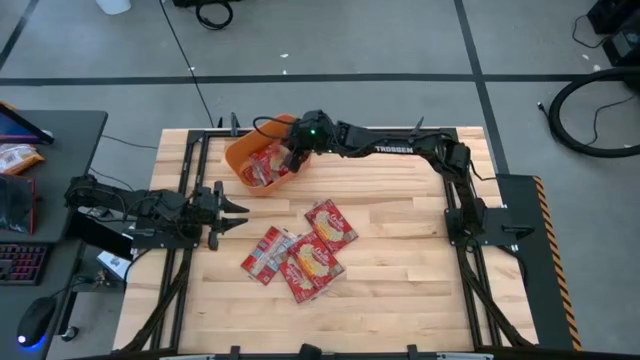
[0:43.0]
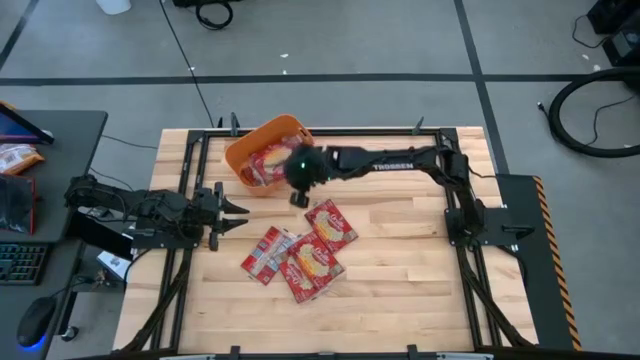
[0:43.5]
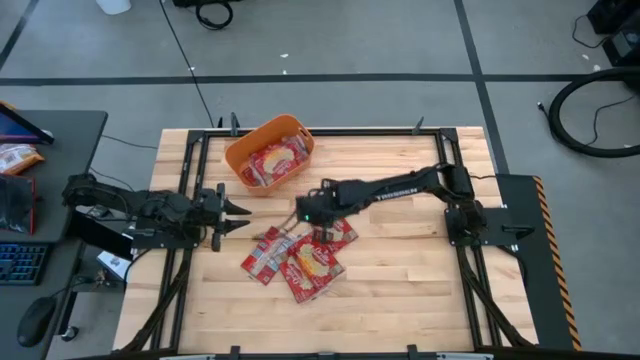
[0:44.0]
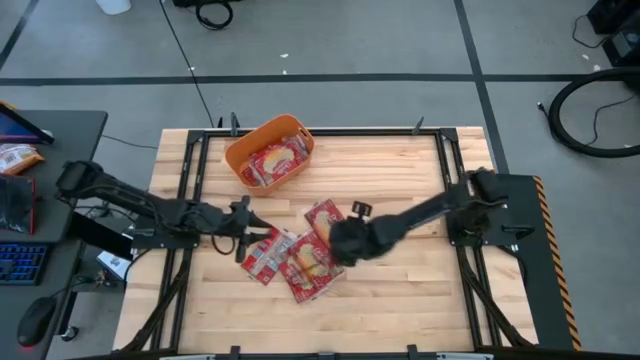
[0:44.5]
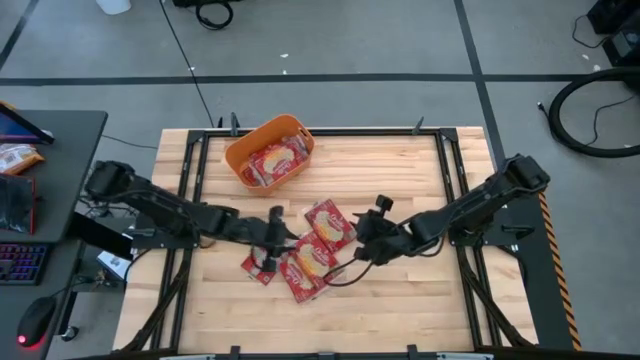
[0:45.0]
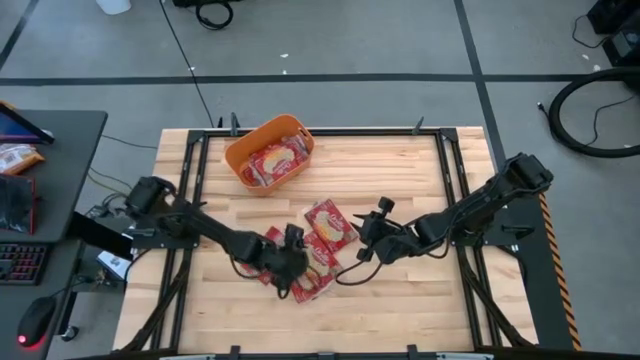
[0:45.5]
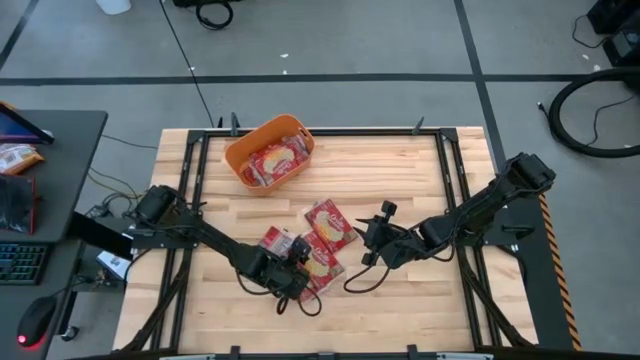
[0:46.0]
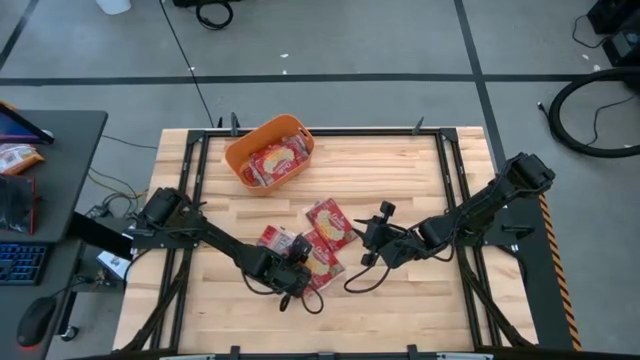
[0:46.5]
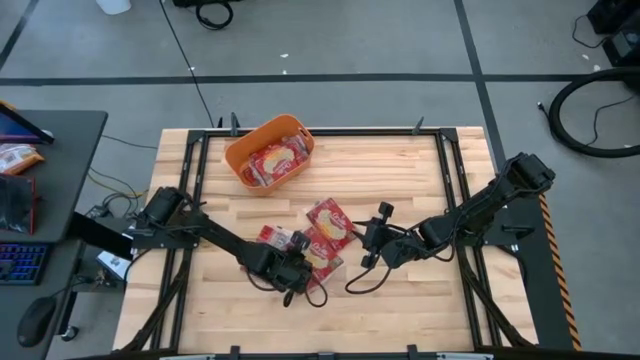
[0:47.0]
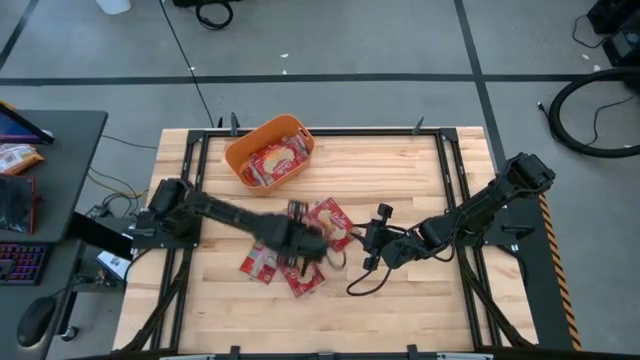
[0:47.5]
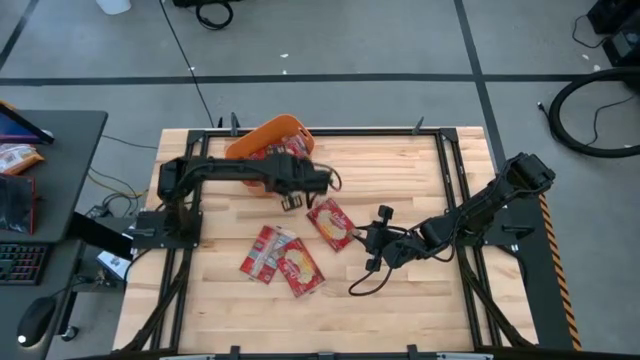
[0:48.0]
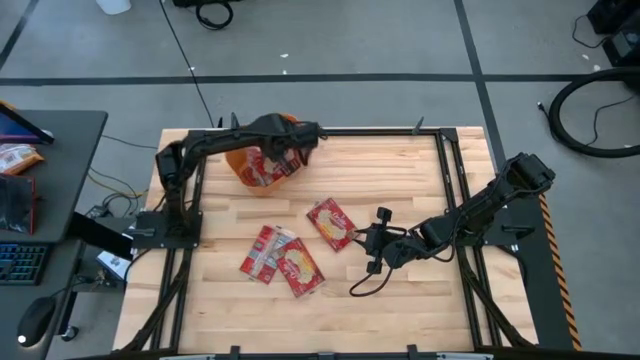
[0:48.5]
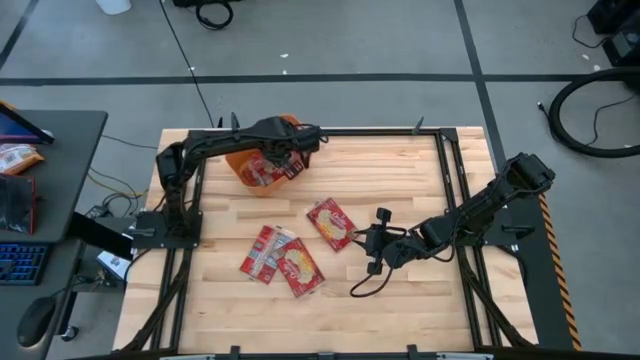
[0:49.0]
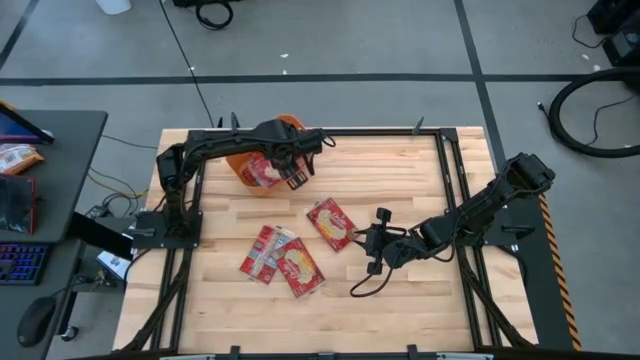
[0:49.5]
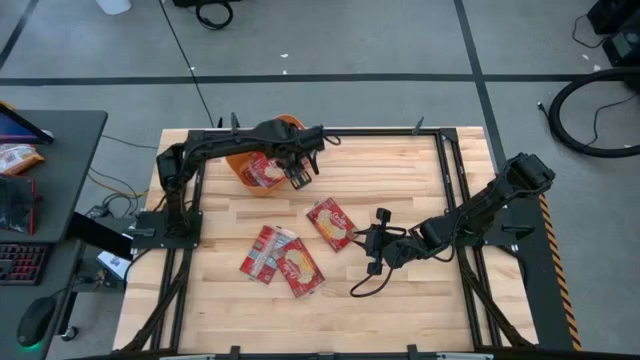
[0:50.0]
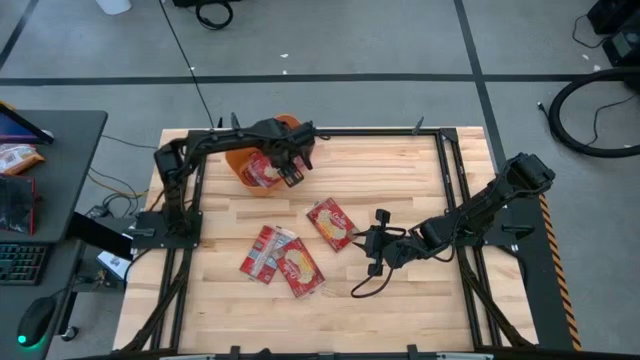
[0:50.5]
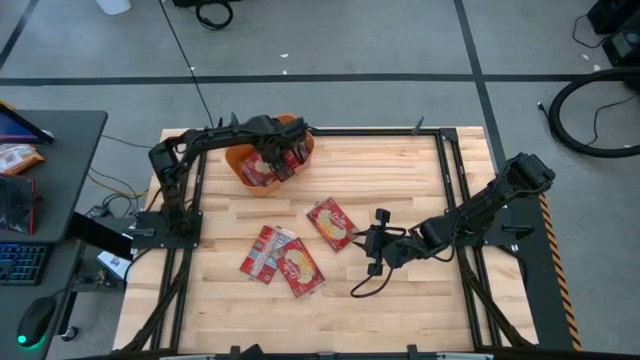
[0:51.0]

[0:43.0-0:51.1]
Task: Sort popcorn bags into baskets
Put the red popcorn bag into the orange bin

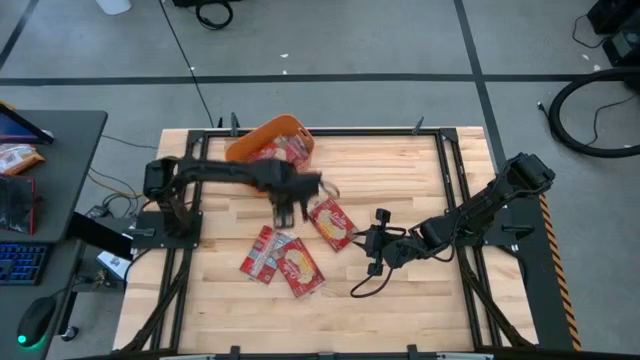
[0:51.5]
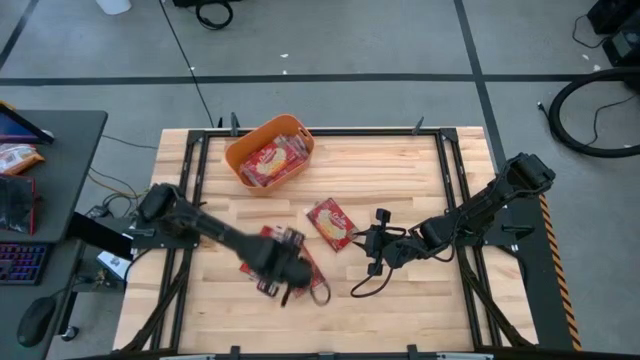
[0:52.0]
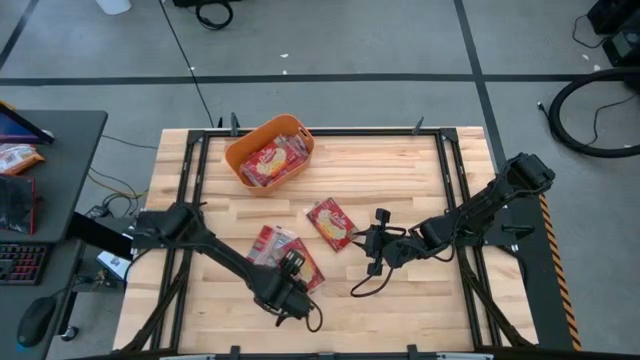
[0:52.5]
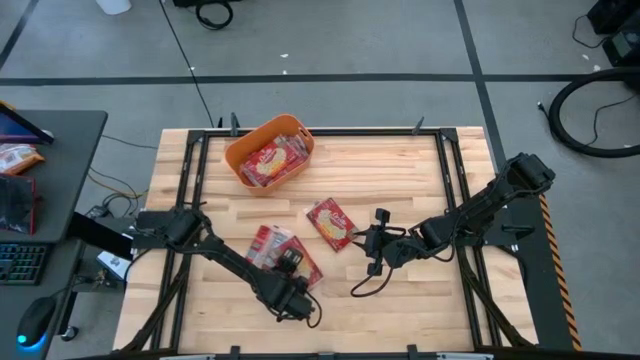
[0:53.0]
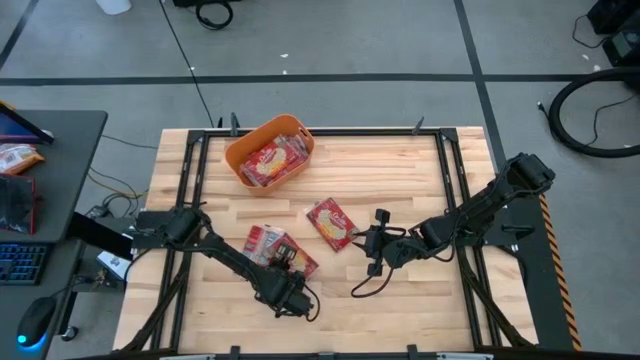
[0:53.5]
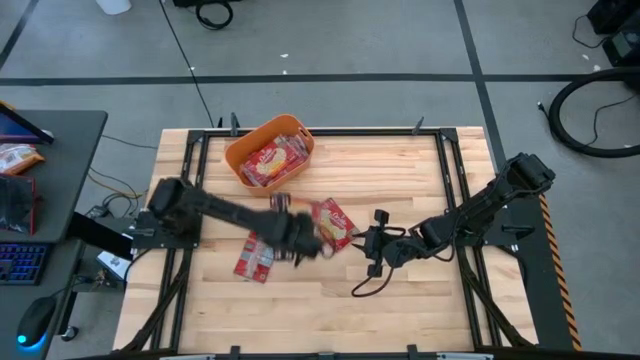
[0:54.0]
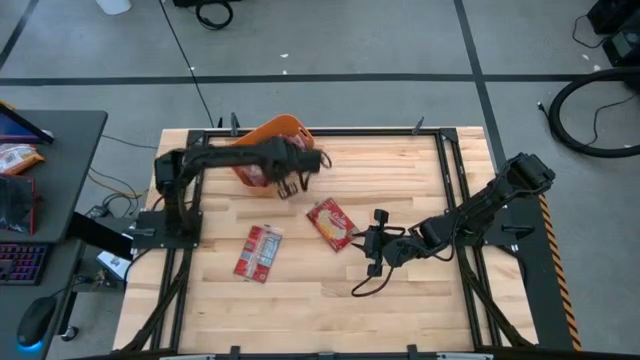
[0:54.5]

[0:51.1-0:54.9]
Put the red popcorn bag into the orange bin

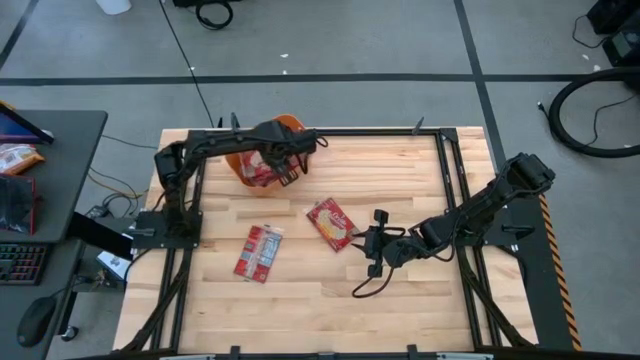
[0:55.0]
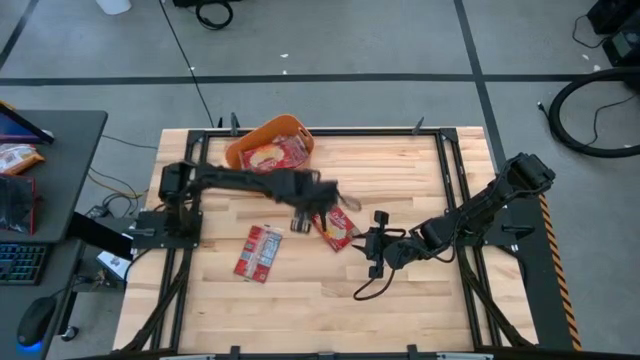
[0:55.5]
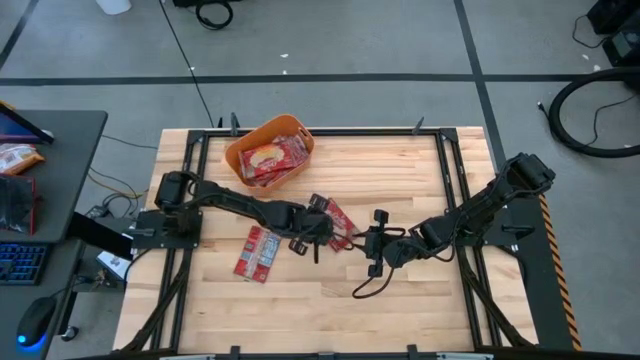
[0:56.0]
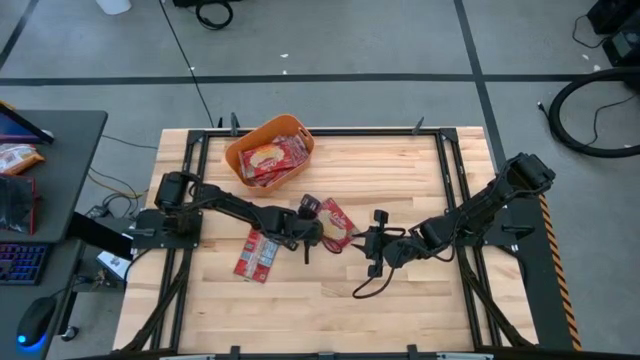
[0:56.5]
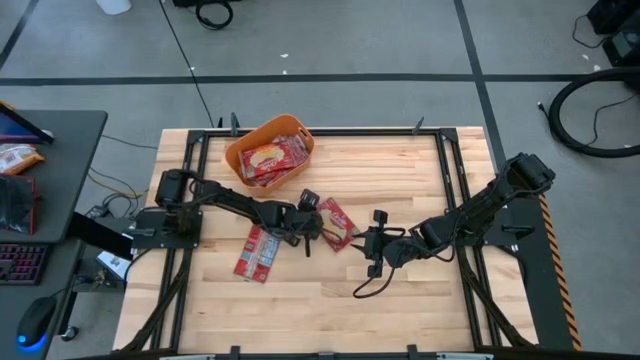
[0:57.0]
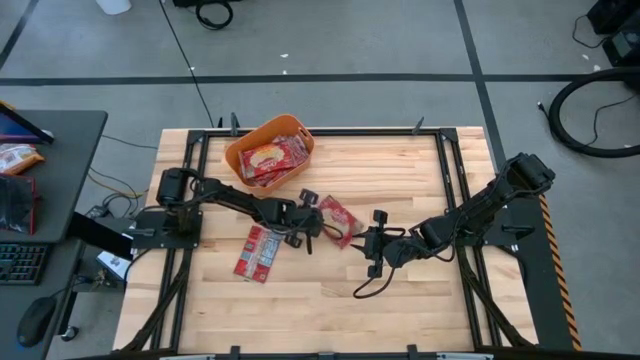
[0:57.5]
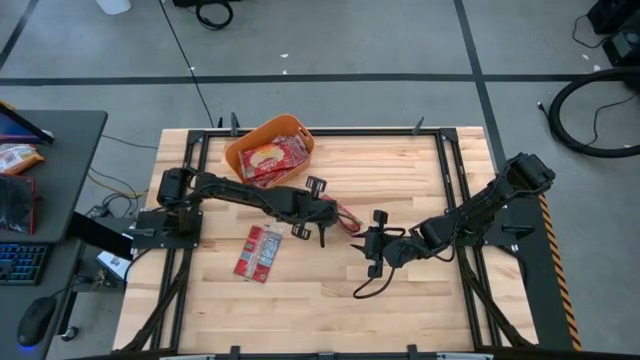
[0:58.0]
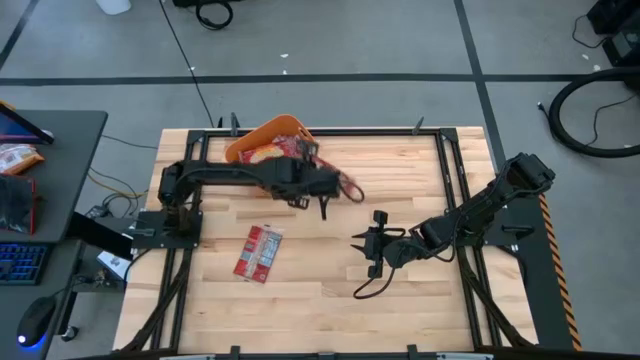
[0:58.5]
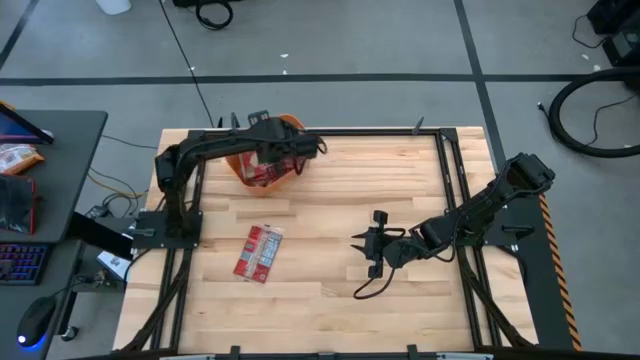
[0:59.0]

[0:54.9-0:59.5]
Put the red popcorn bag into the orange bin

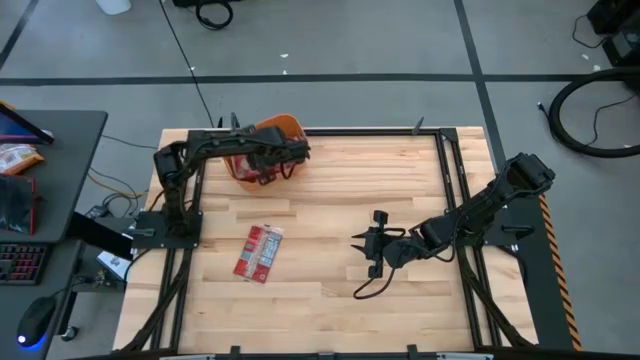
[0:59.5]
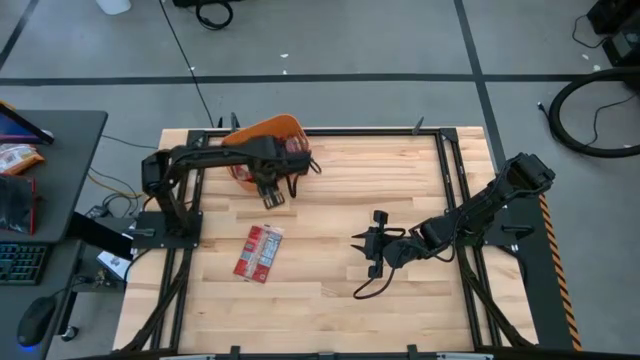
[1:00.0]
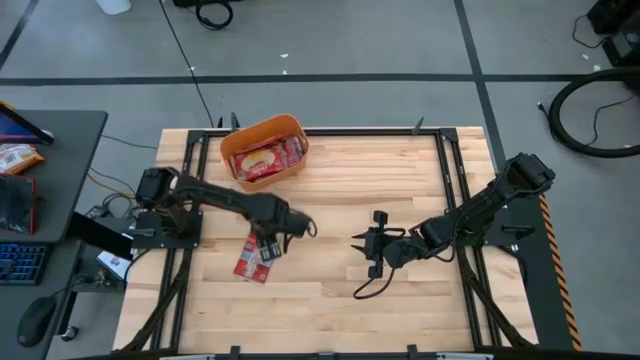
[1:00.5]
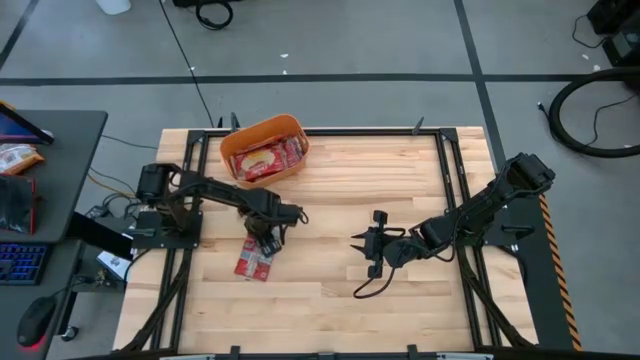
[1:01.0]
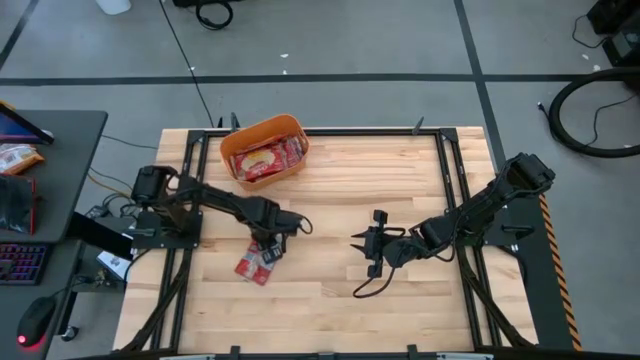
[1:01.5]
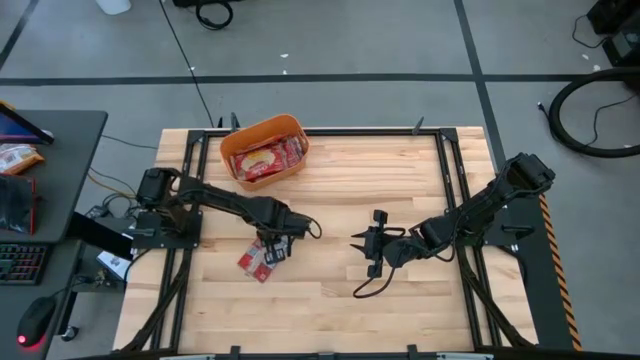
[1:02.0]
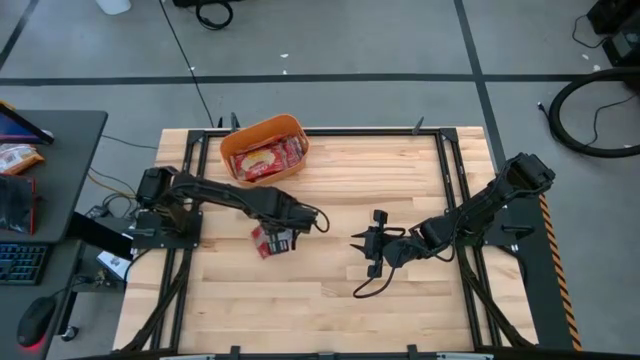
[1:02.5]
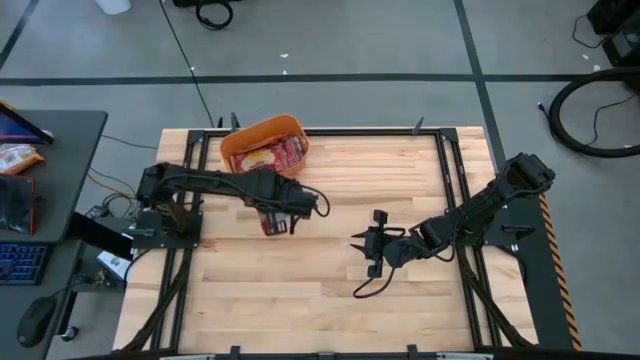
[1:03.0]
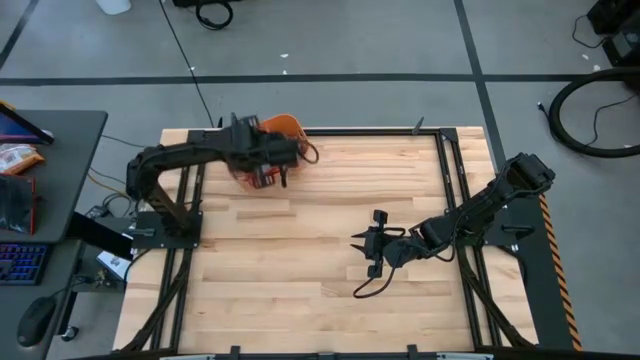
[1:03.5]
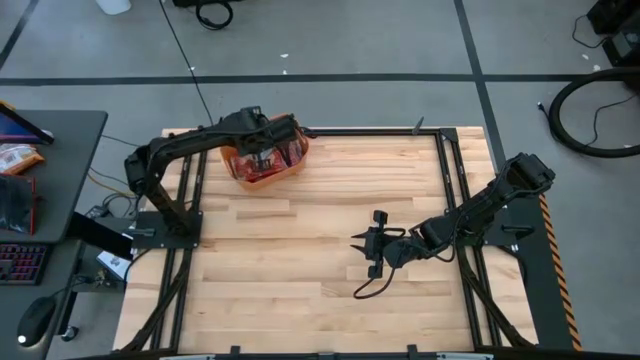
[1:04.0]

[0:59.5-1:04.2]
Put the red popcorn bag into the orange bin
